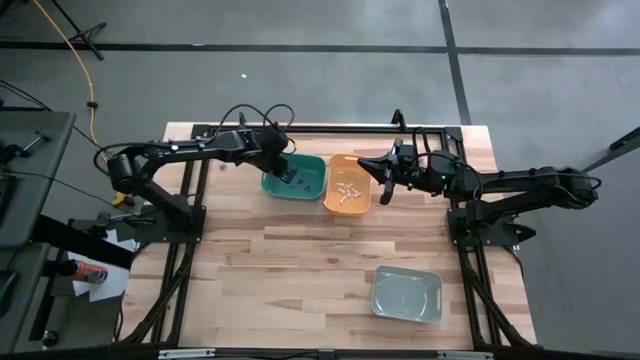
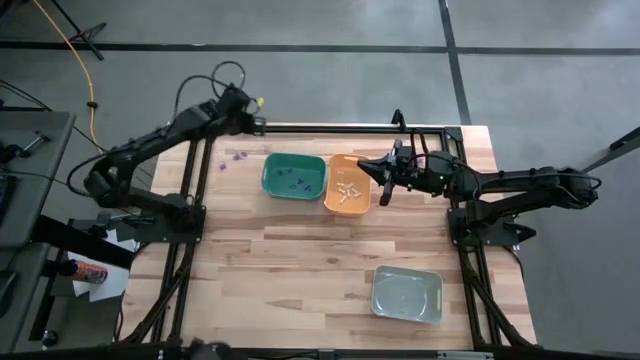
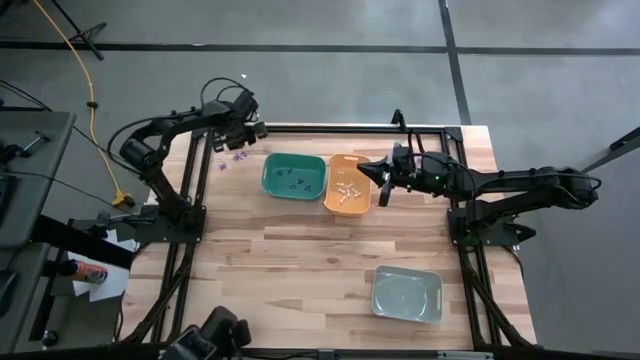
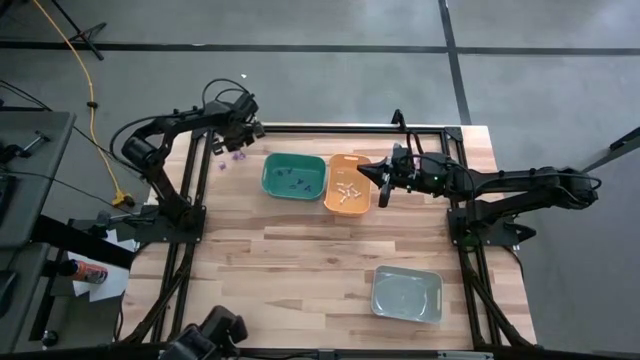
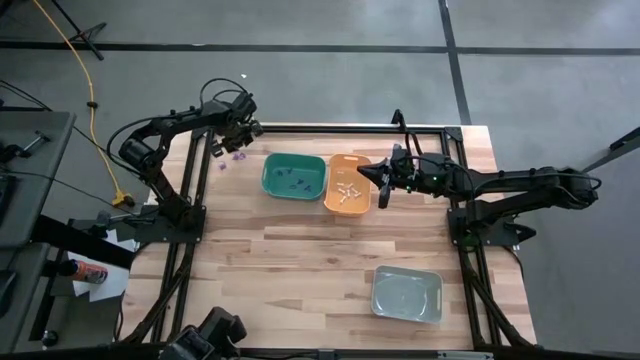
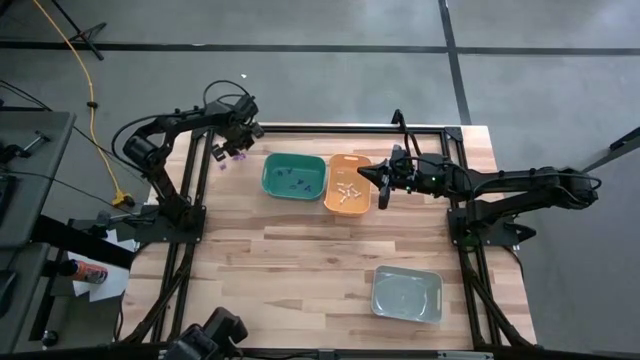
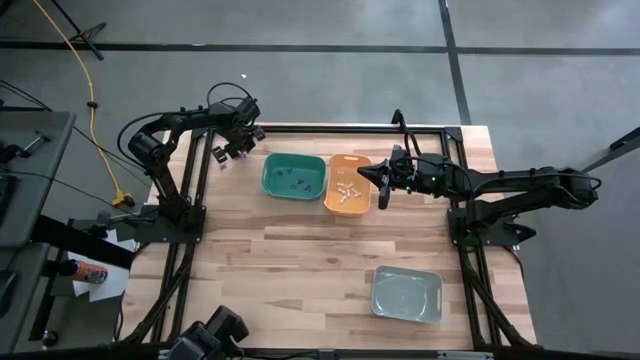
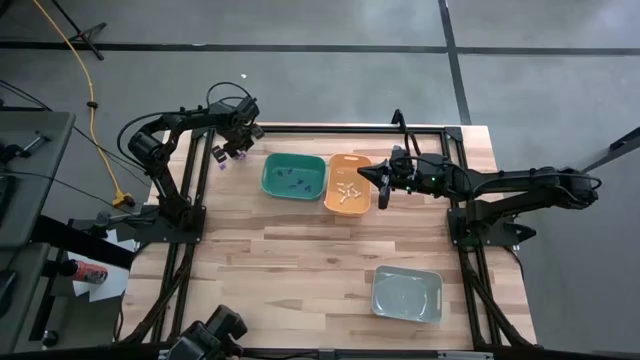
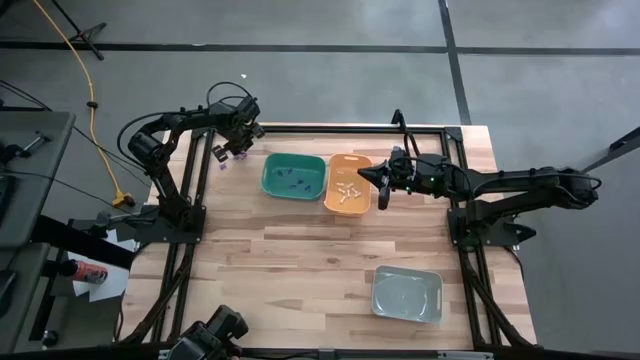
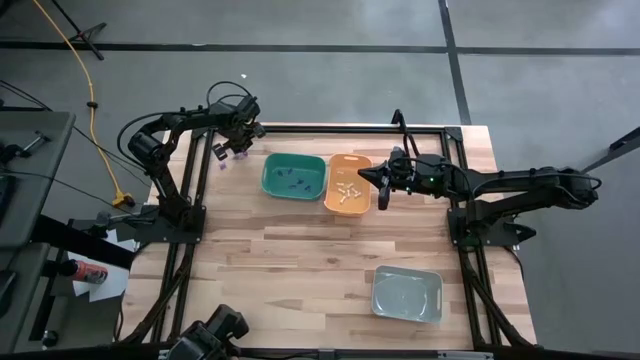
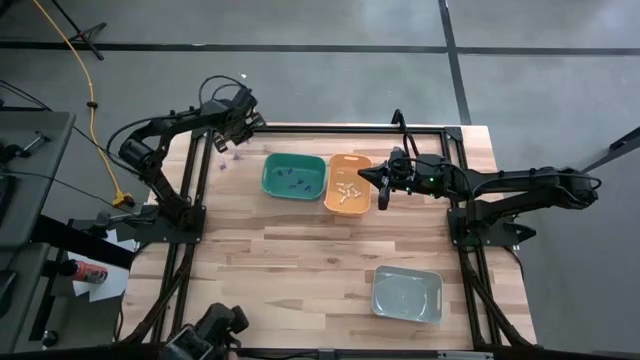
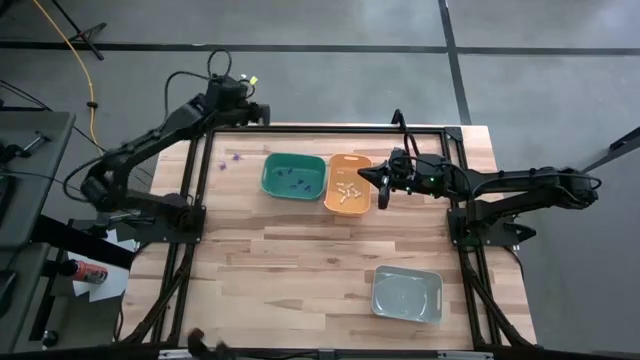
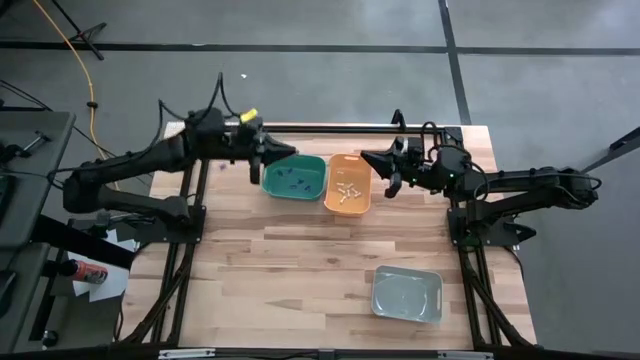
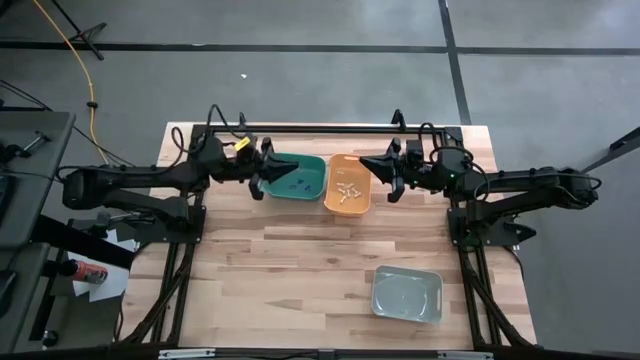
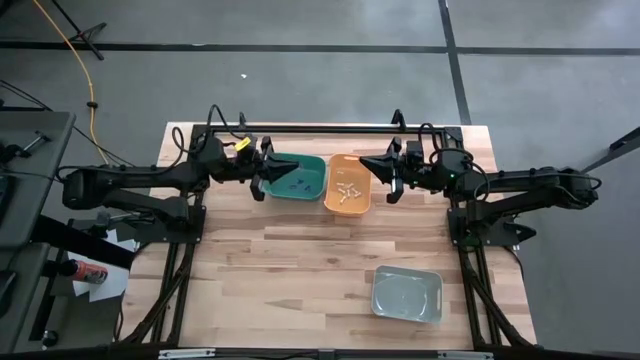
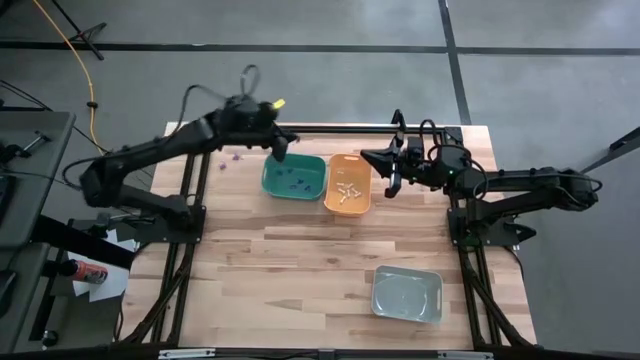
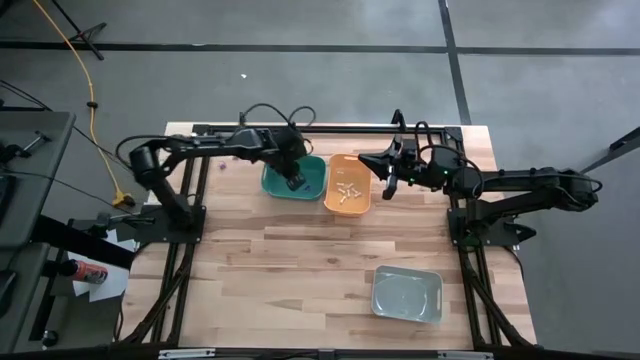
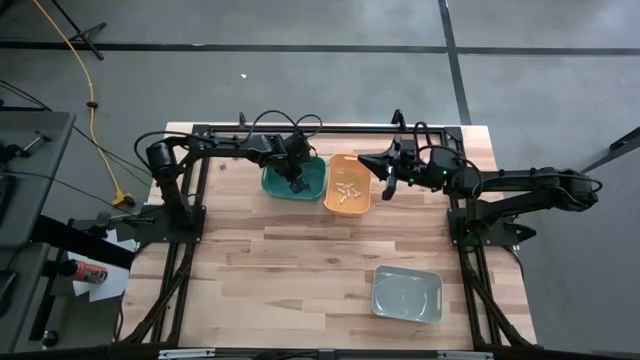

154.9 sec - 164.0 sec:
Task: Sort Halloween decoration
Put the violet witch hut toy into the green bin

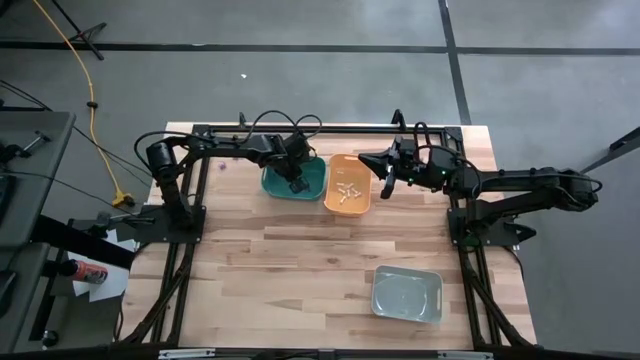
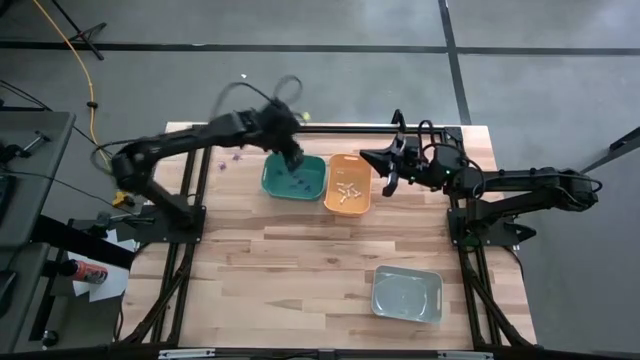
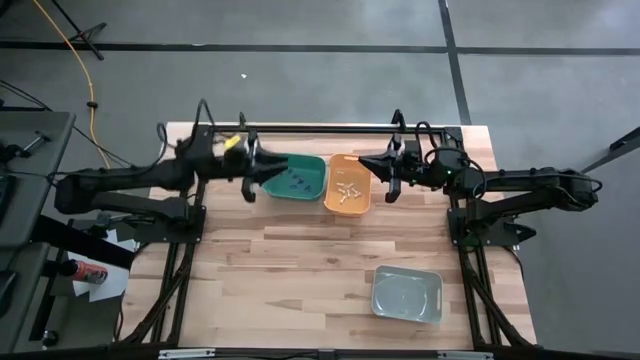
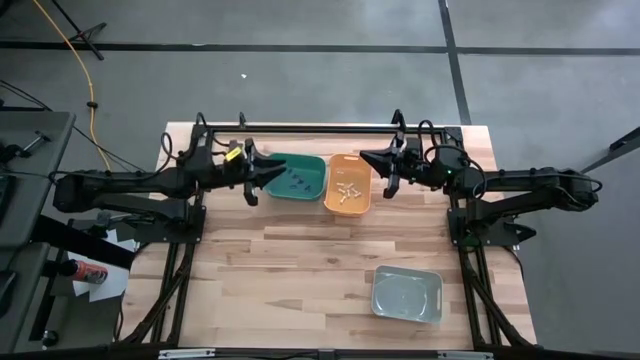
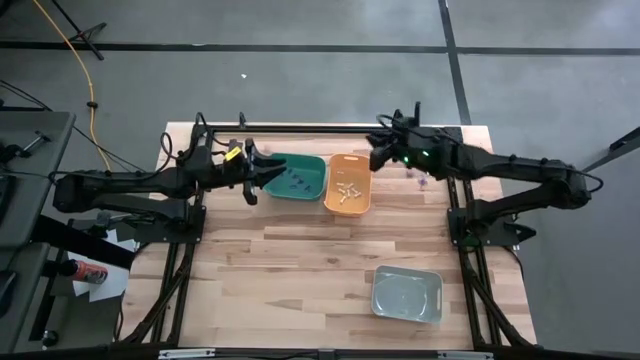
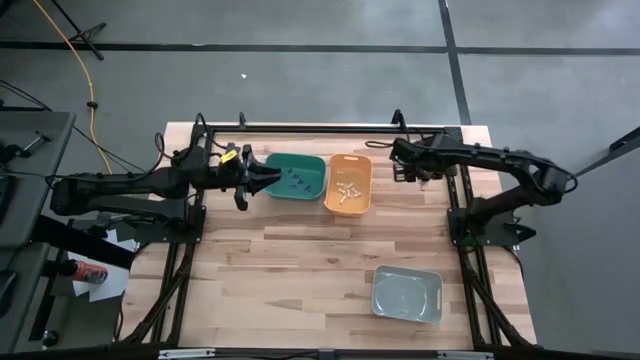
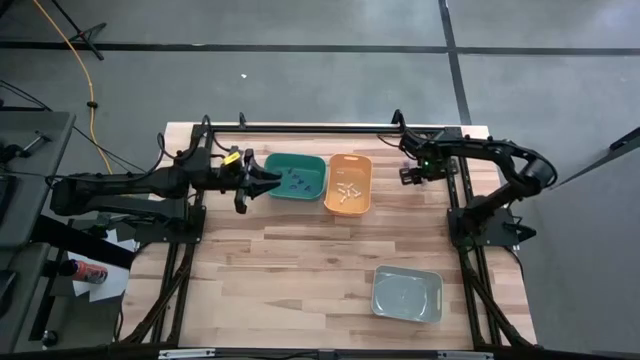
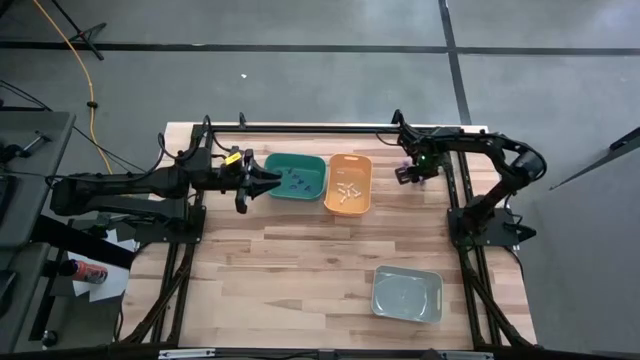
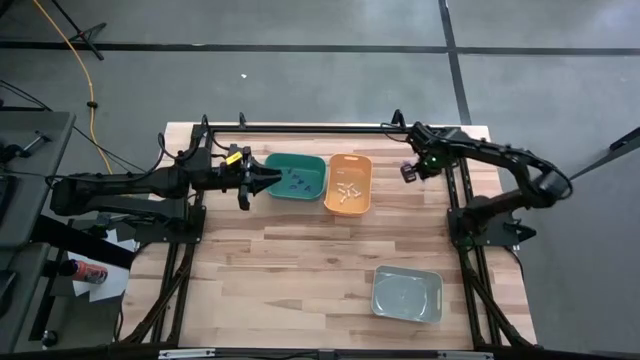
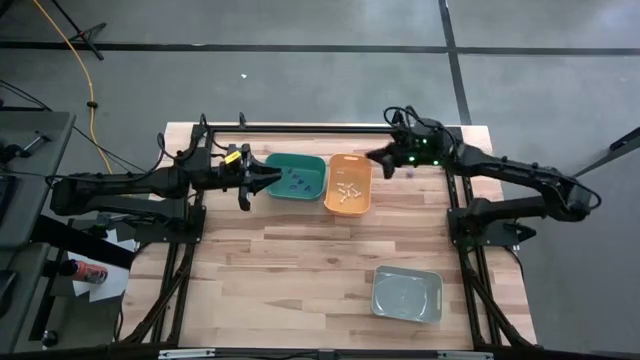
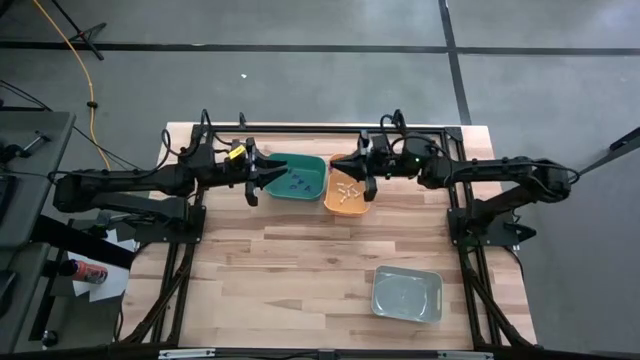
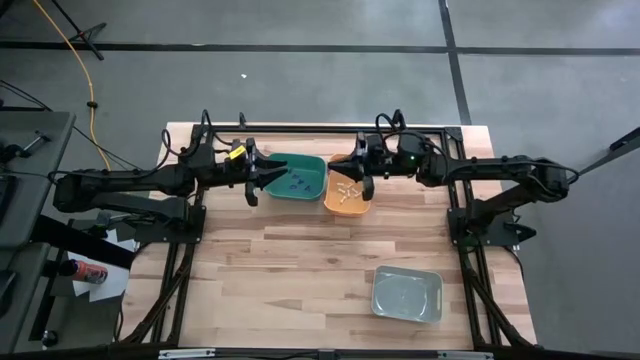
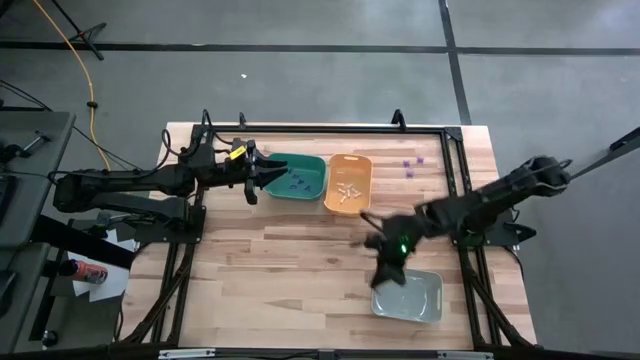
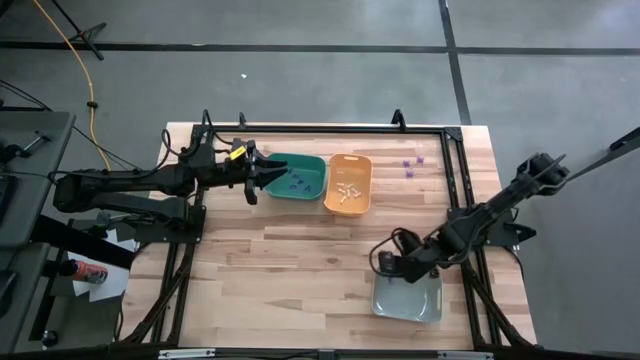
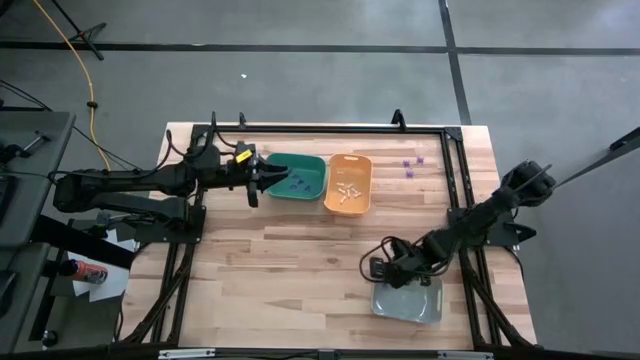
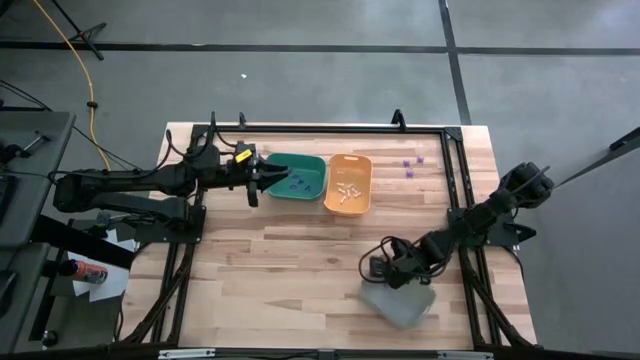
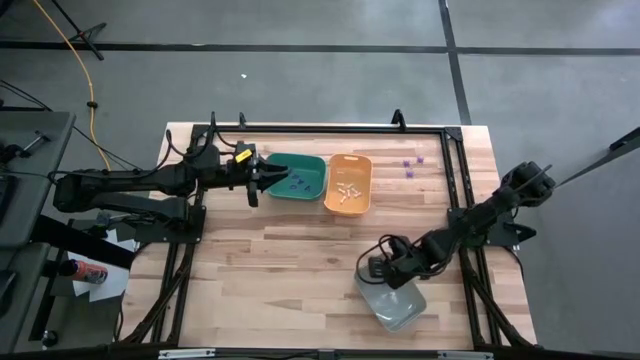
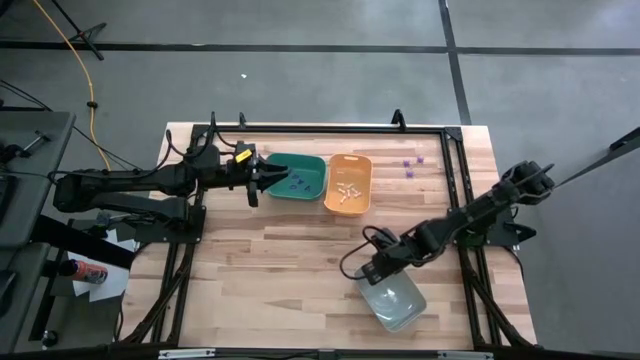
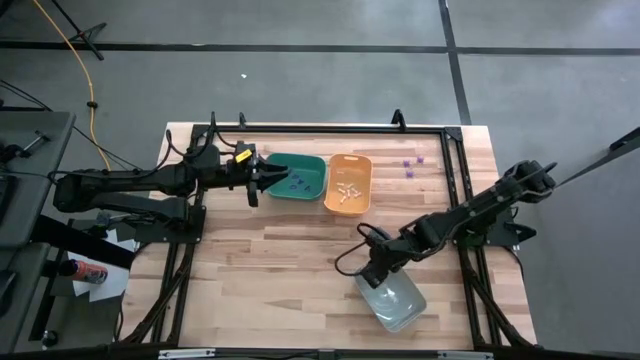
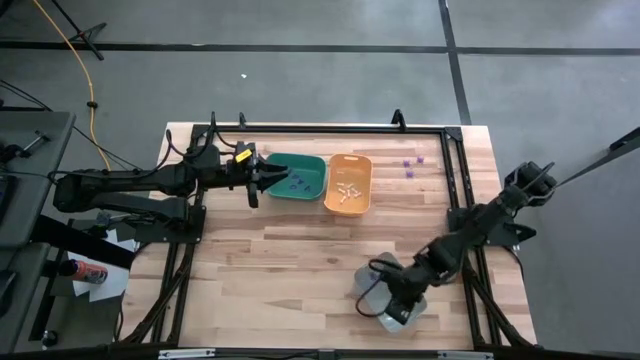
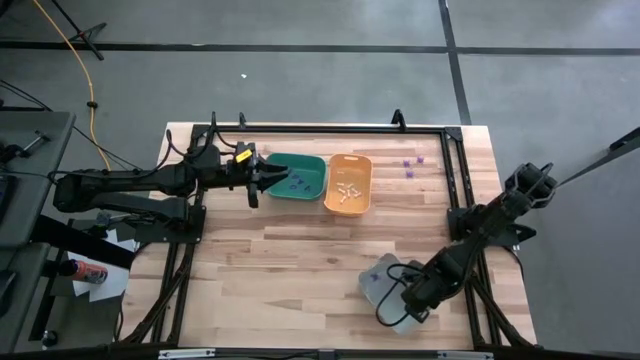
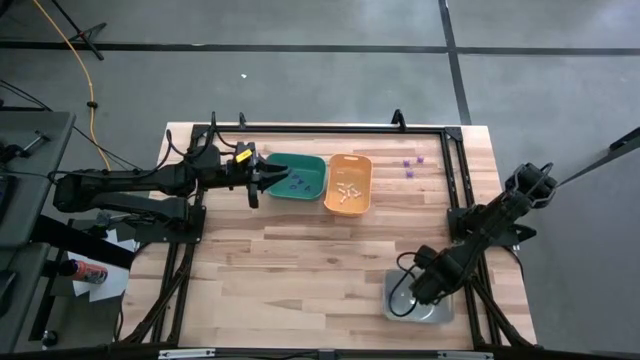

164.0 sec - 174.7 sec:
Put the violet spider toy into the gray bin

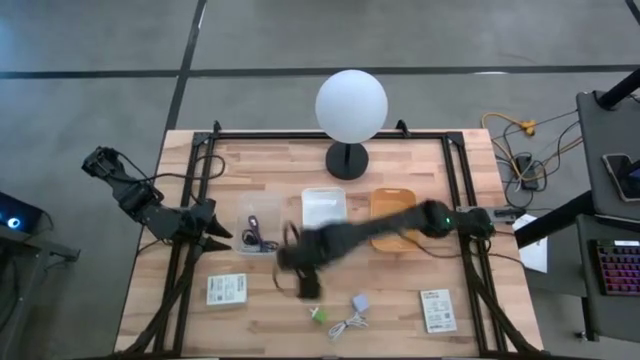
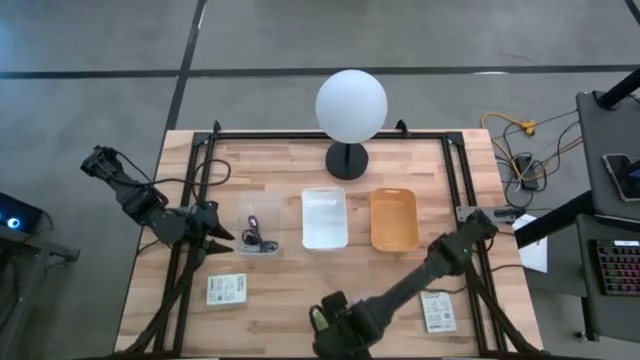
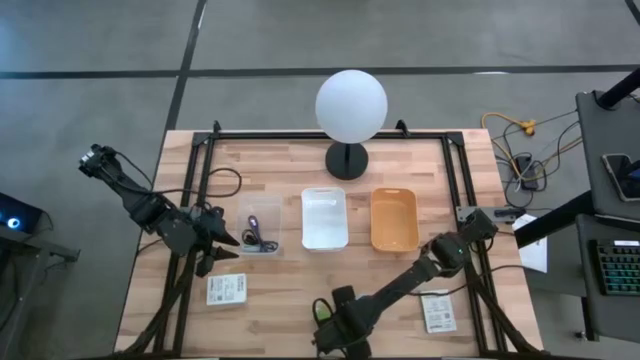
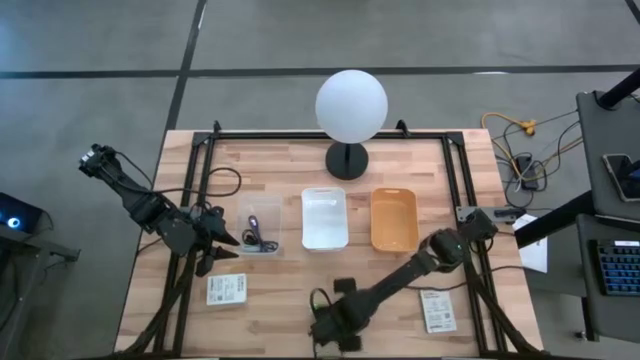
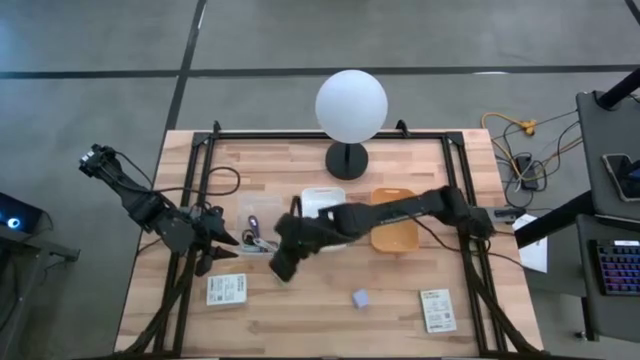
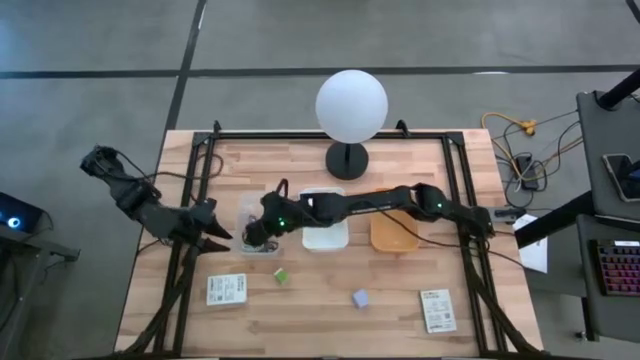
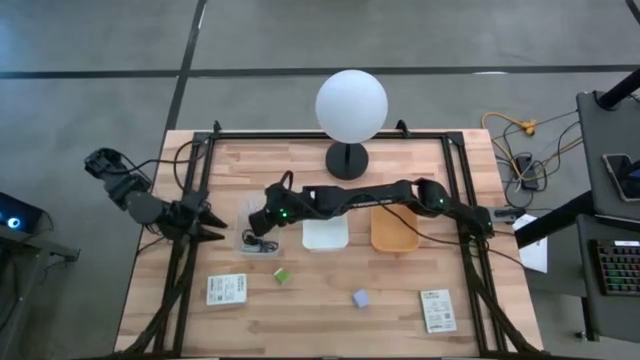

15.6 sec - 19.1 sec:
Task: Pick and place items into bin
Put the white charger cable into the transparent bin
